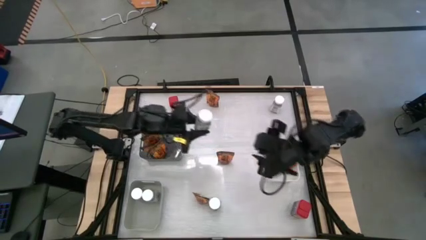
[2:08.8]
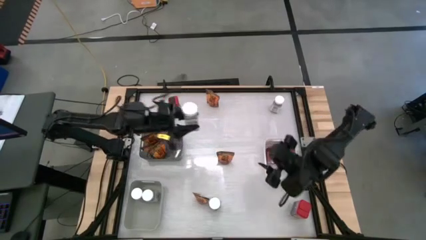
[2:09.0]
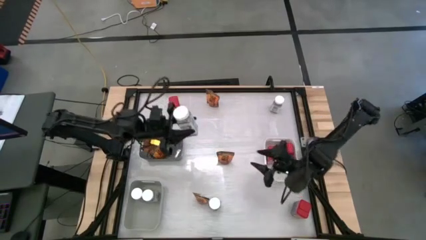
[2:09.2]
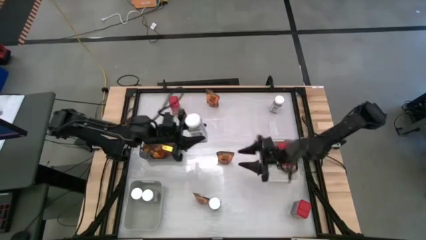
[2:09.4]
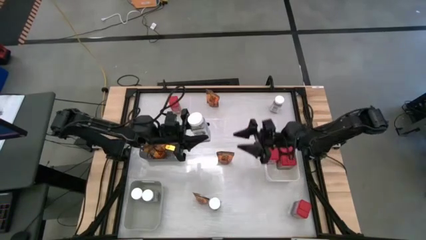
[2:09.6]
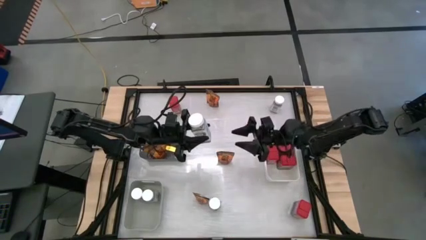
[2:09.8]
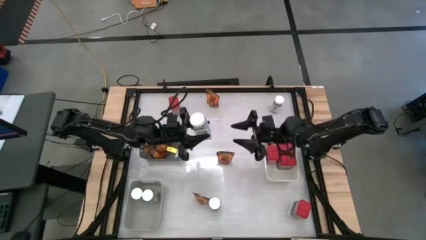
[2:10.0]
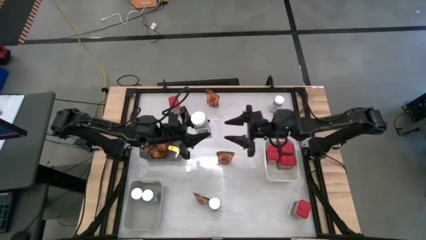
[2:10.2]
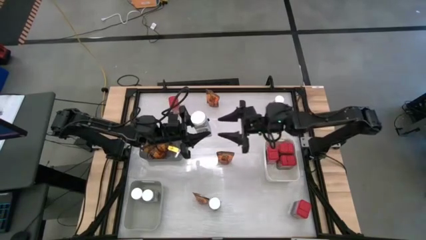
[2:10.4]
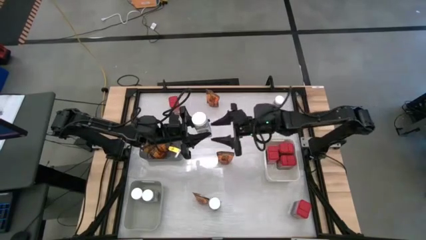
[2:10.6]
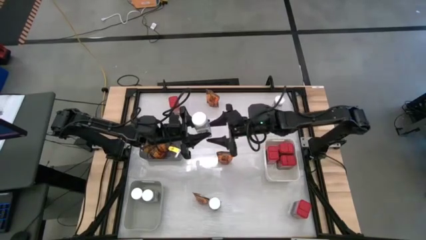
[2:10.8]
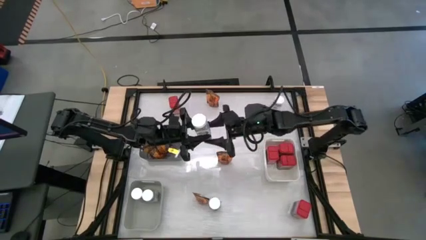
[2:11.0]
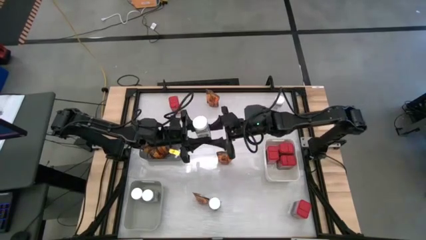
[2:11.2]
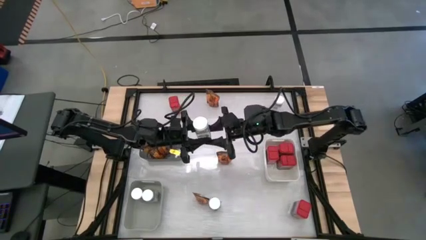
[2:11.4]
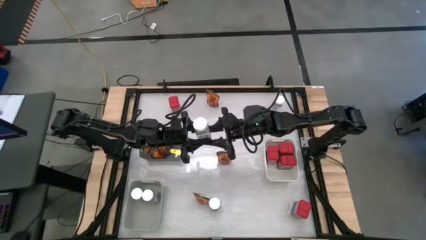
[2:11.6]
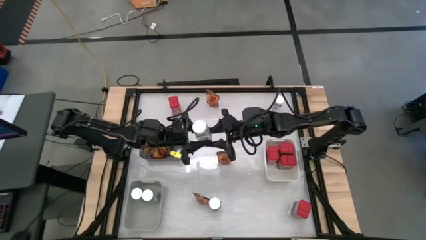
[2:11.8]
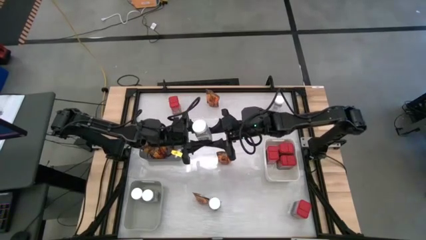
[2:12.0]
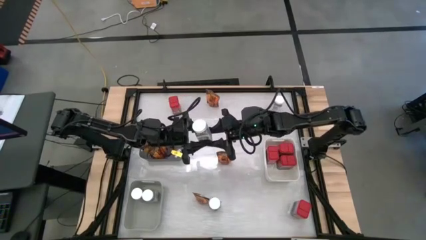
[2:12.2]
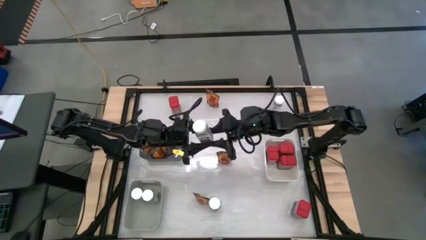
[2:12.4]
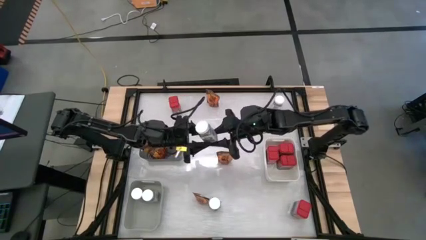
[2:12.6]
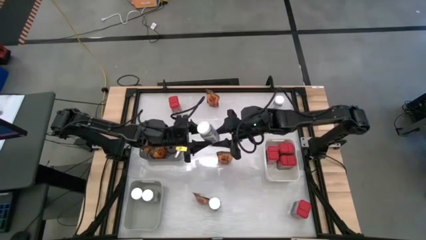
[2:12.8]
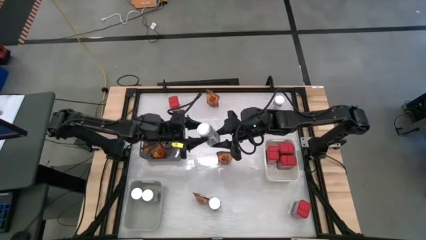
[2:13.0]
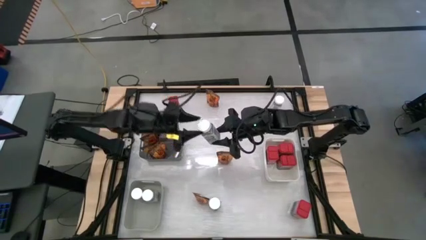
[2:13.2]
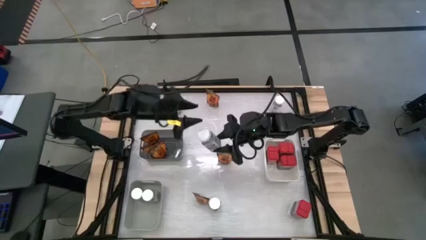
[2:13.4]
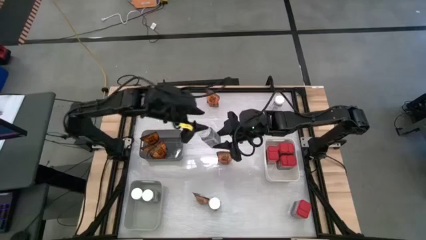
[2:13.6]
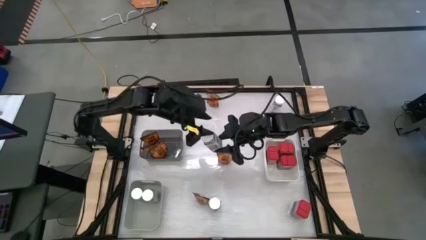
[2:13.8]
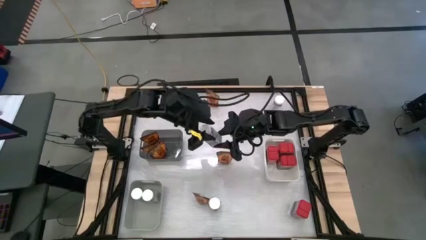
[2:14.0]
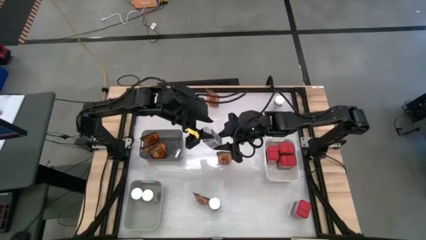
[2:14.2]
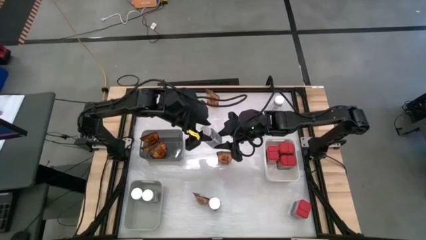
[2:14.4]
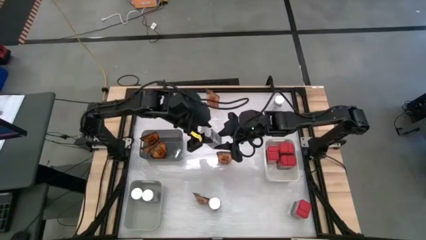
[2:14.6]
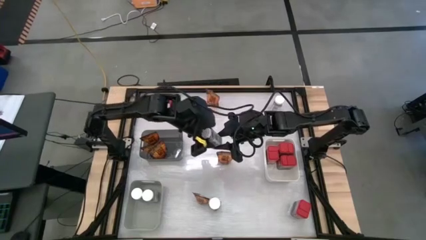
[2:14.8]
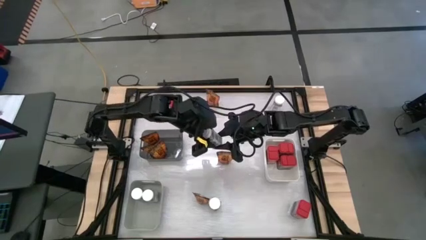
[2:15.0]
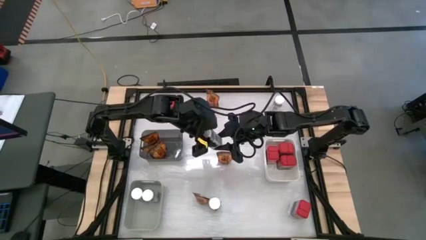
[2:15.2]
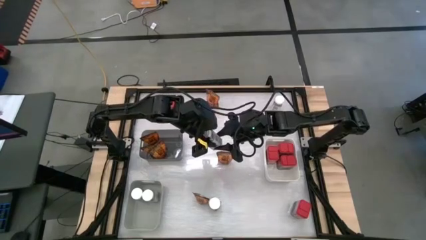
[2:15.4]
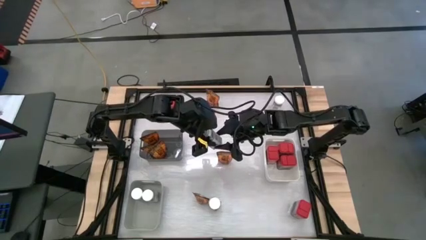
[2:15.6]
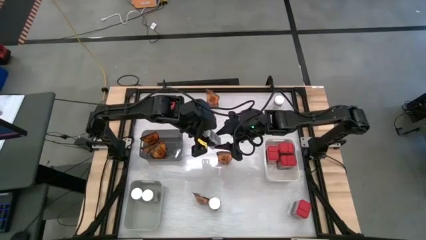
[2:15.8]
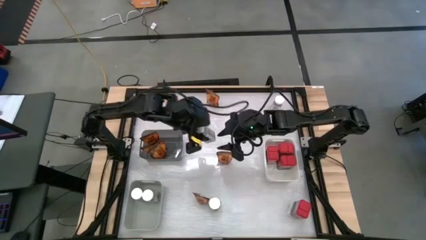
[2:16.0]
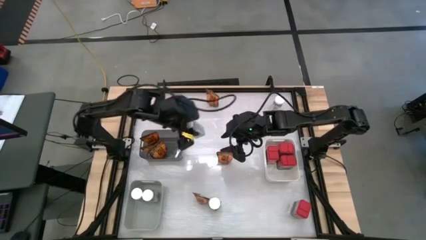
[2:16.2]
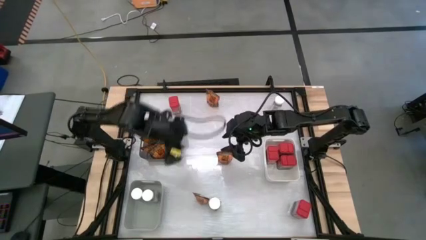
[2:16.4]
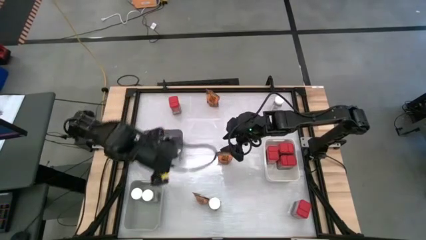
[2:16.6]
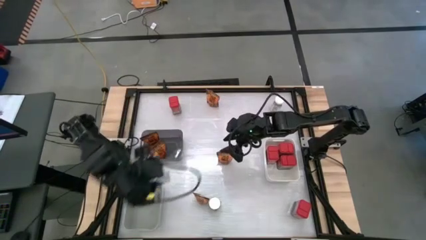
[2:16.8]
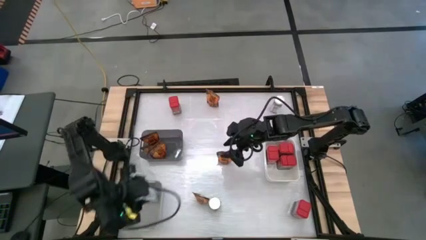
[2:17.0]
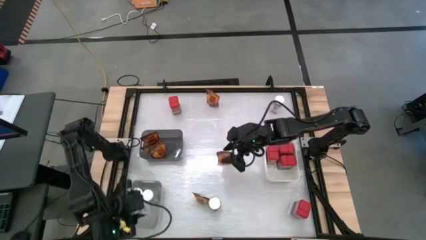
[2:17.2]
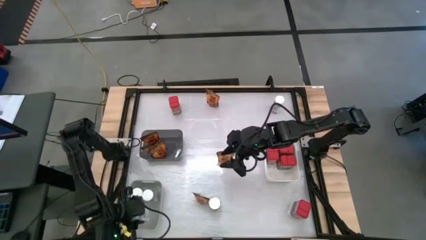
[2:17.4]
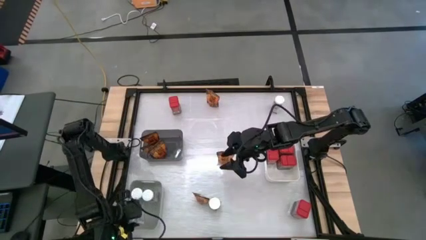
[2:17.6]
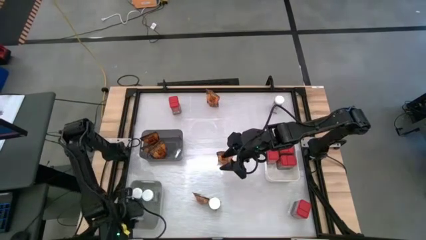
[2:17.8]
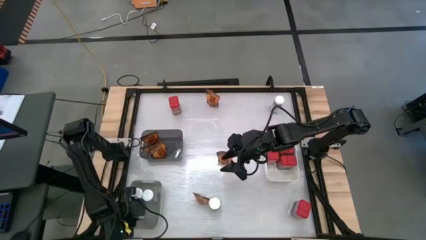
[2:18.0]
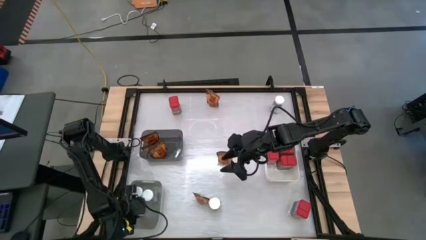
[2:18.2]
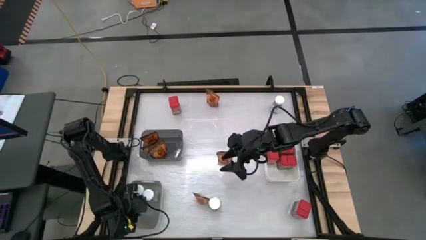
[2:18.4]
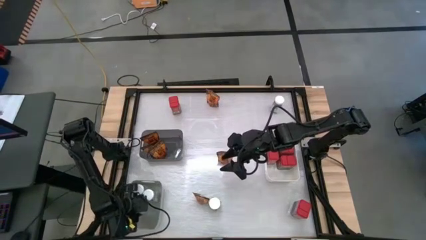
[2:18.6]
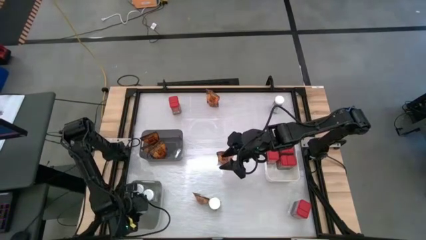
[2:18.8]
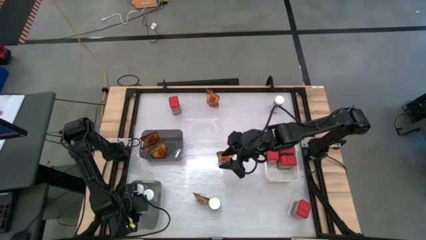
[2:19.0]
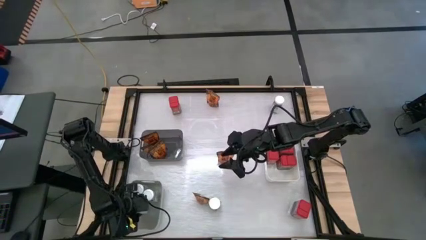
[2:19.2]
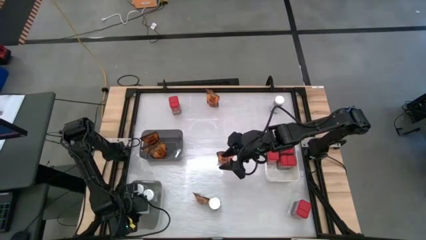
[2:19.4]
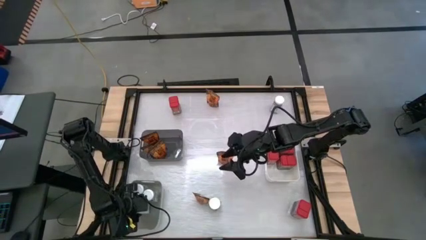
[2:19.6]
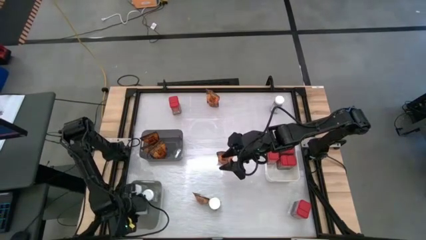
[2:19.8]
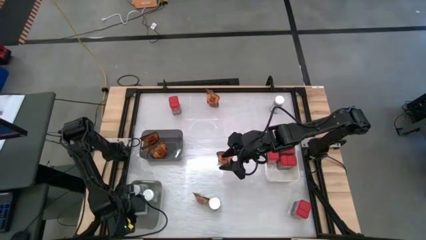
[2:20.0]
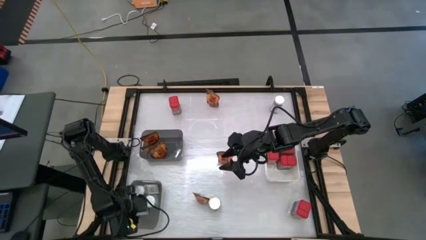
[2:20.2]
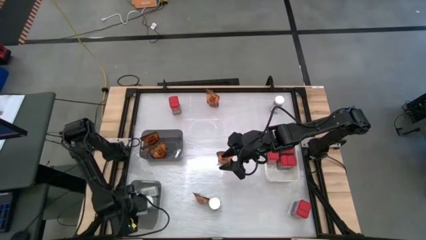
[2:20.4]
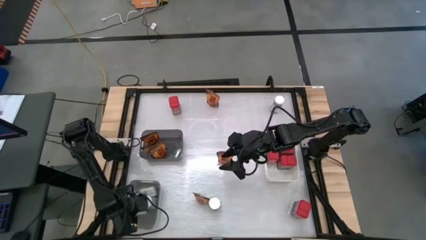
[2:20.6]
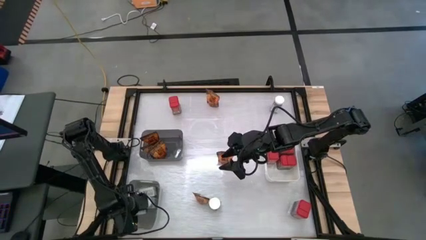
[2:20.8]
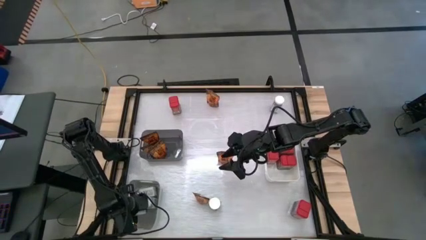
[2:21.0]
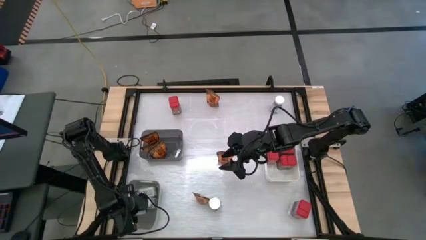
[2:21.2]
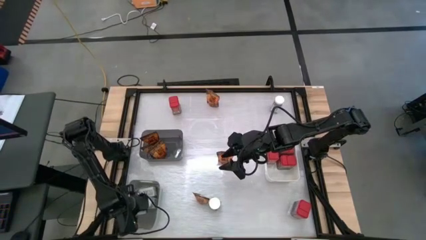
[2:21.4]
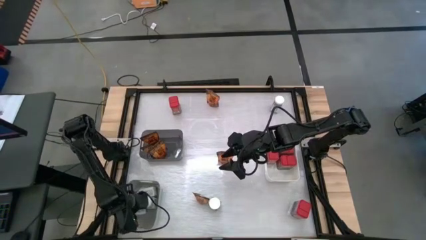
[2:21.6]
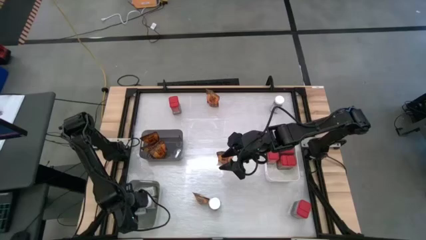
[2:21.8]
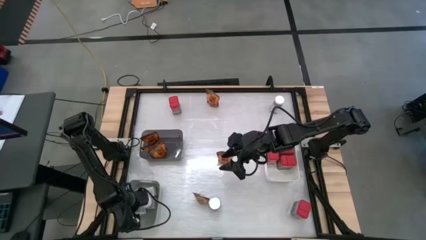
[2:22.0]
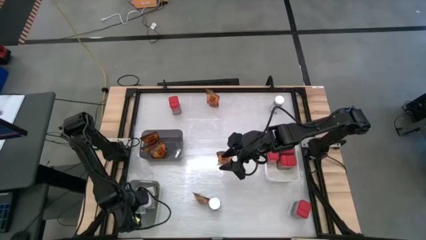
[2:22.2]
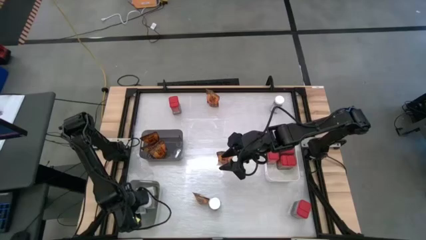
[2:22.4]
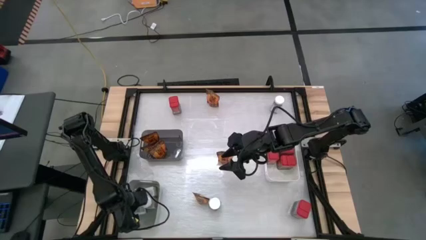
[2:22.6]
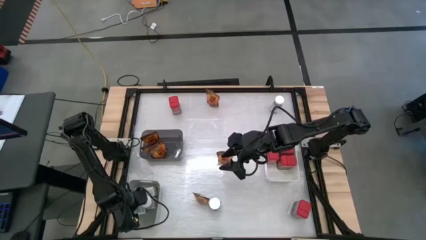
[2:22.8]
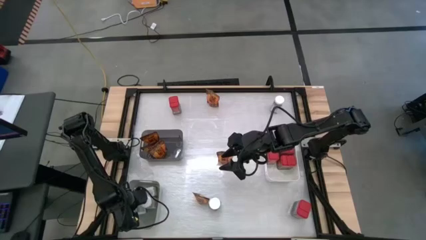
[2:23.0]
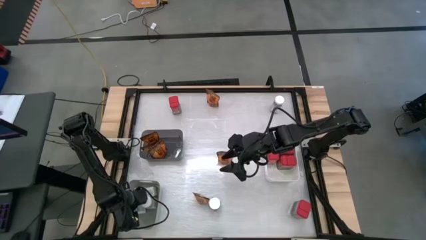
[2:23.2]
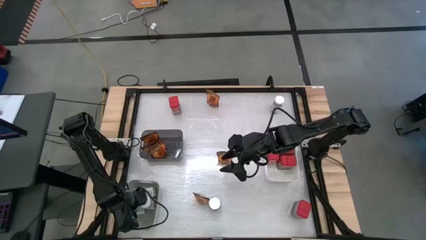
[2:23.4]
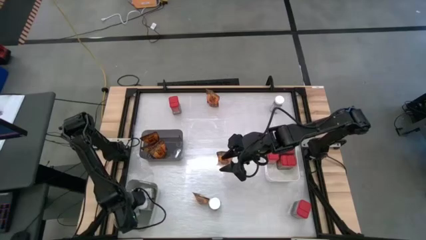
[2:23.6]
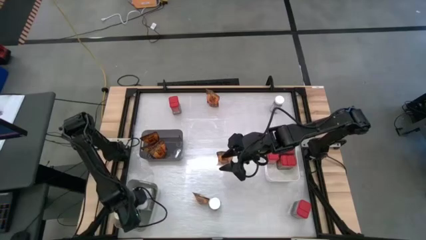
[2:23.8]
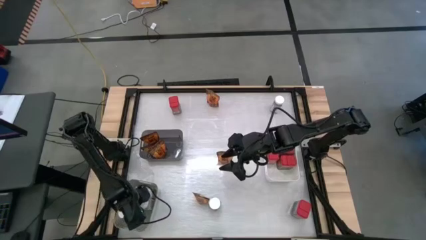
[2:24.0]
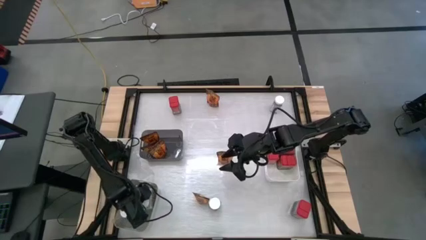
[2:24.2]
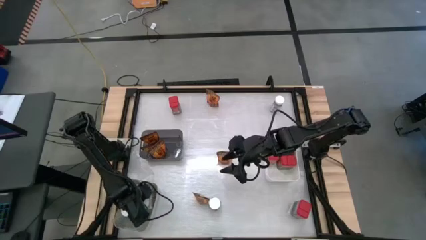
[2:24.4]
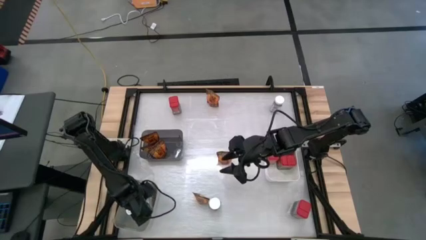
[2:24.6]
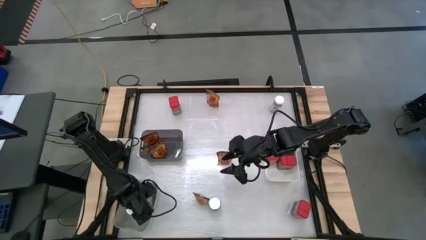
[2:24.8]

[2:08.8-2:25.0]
Task: Sort spices by type
Put the white spice bottle into the gray bin
